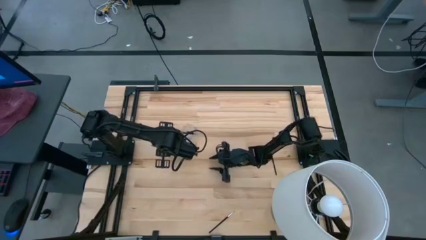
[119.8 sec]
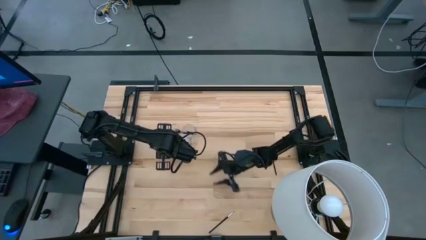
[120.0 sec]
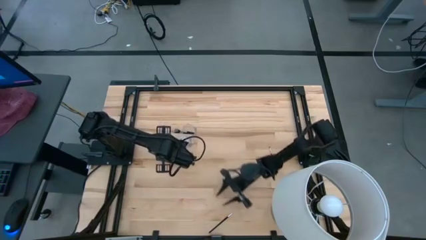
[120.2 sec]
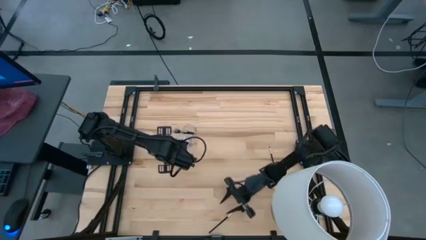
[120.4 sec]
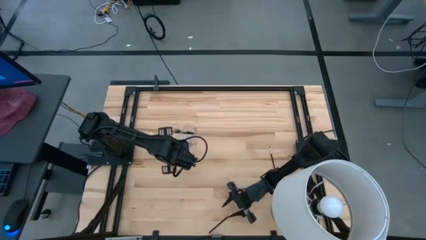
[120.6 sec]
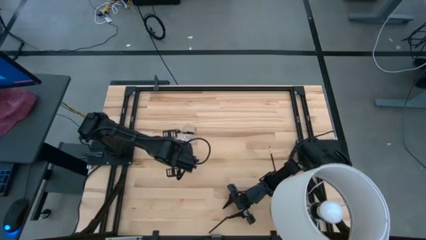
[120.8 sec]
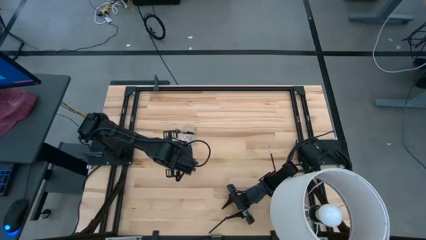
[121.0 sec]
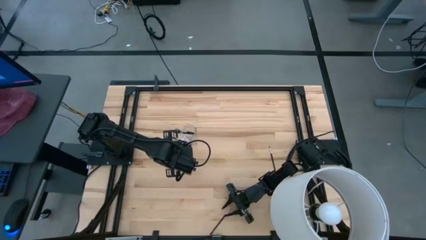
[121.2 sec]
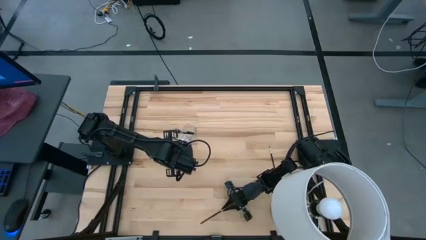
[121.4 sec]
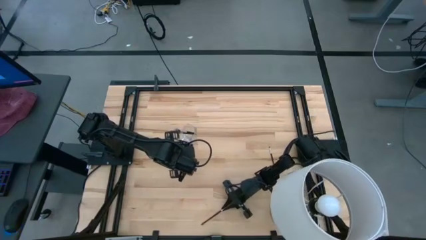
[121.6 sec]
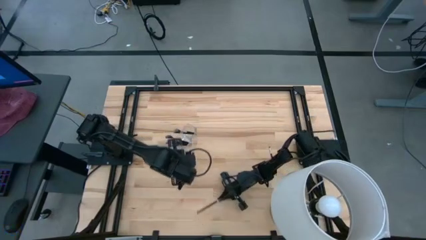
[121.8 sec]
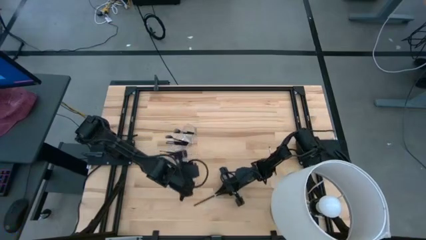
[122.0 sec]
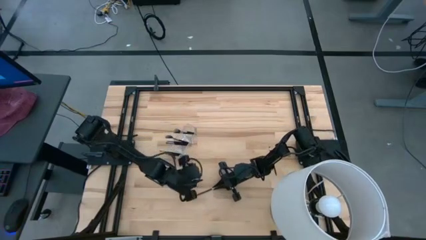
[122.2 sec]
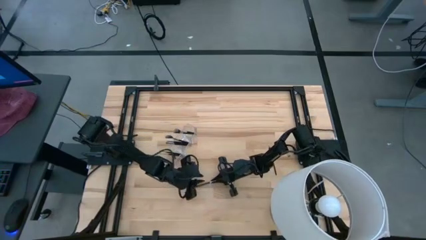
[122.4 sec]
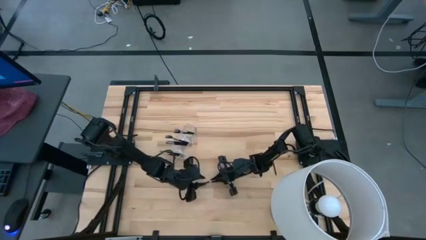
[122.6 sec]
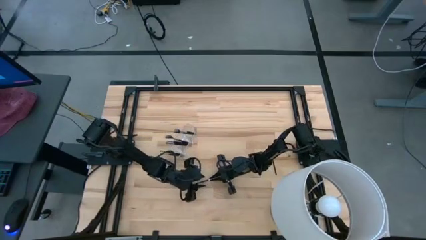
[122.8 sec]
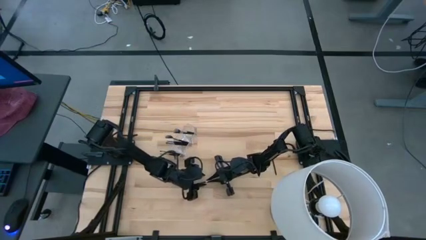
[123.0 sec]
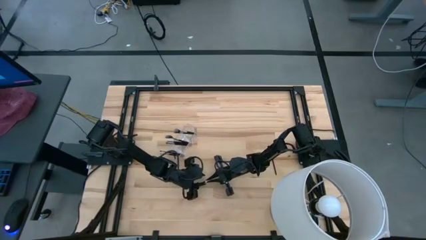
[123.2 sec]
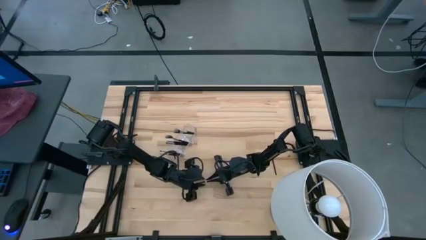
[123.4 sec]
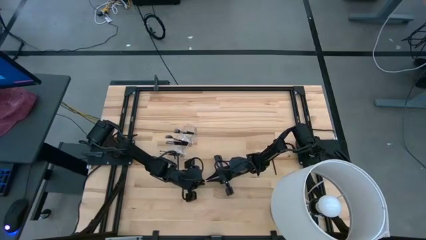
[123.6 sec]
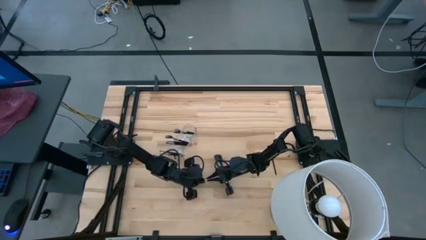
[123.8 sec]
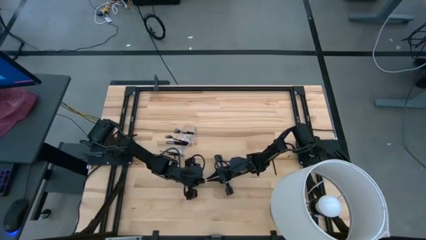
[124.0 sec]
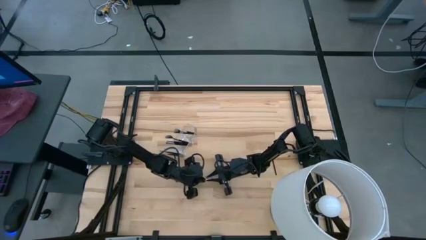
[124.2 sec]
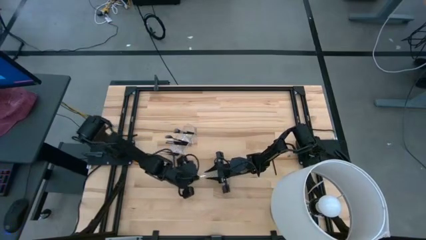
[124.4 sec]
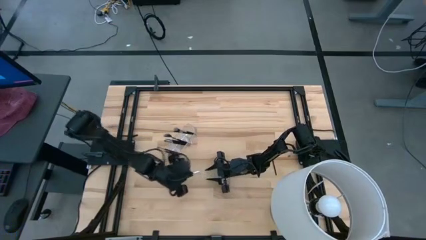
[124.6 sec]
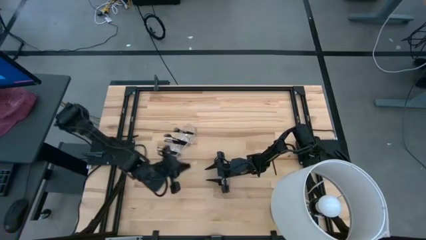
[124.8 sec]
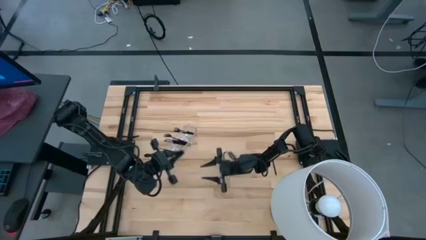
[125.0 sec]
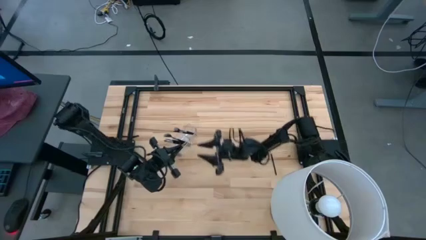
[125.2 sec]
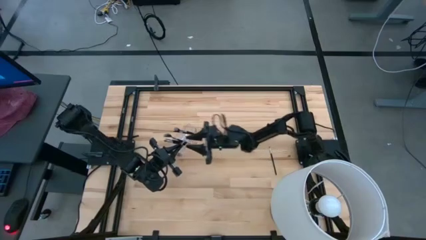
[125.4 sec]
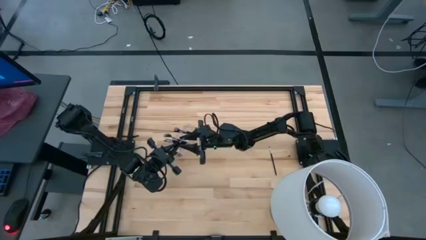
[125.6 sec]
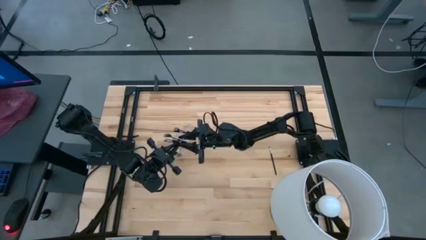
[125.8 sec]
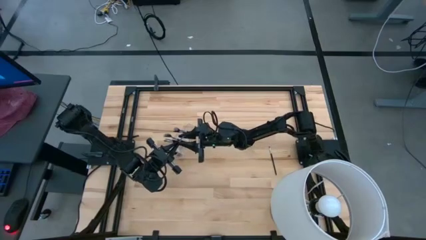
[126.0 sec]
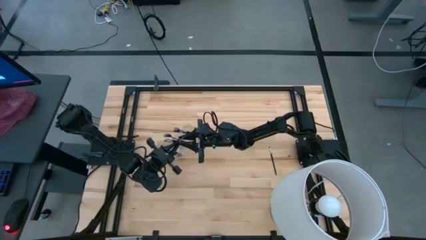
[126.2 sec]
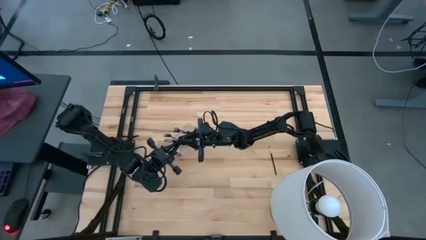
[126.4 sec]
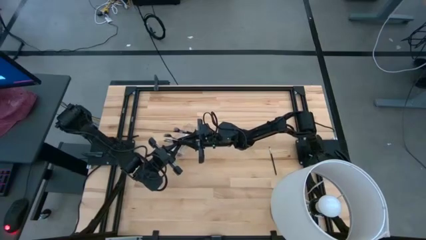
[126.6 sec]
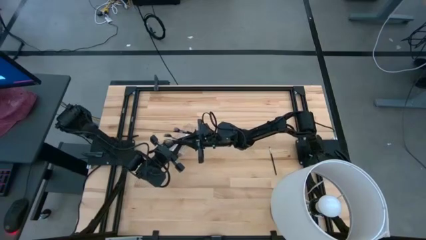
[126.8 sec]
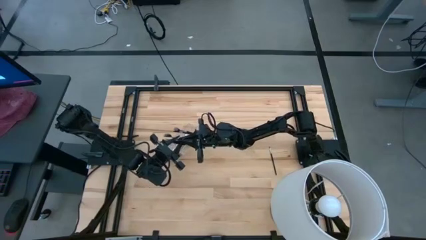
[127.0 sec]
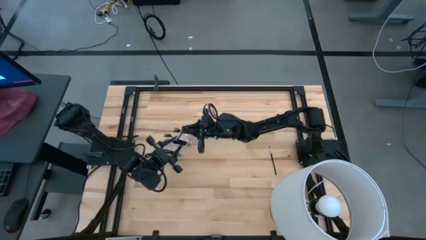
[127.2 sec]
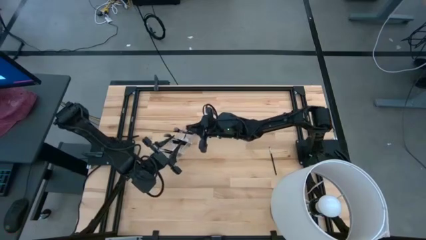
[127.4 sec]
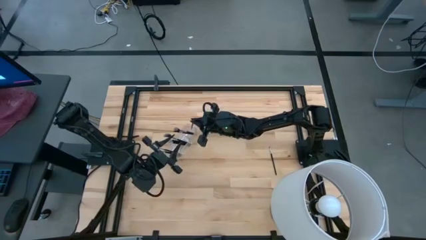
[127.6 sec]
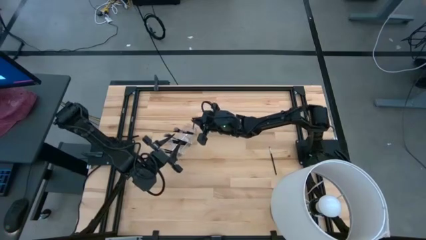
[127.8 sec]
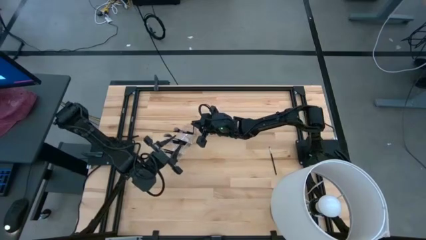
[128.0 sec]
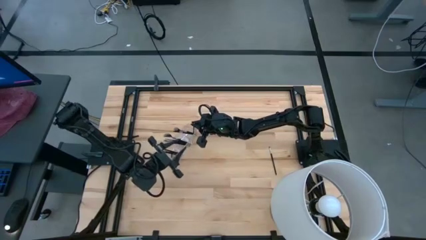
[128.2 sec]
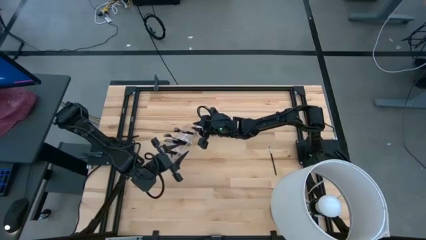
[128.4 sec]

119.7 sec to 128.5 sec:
Task: Put items in baskets/containers
Put the eyeshadow brush into the middle section of the transparent organizer

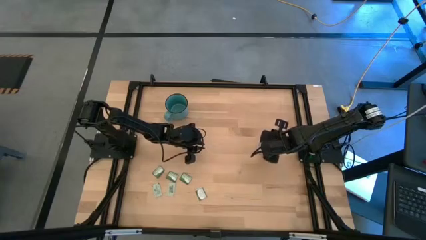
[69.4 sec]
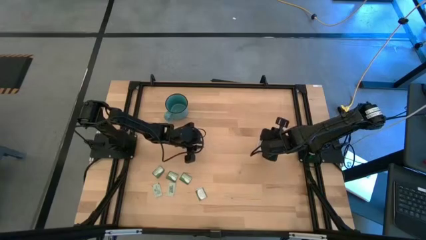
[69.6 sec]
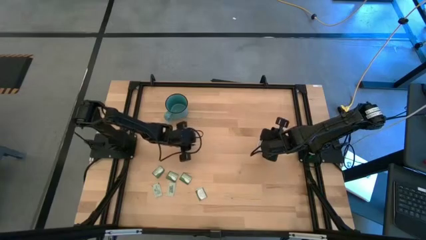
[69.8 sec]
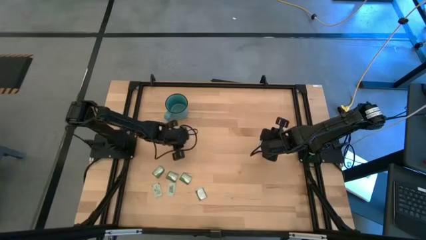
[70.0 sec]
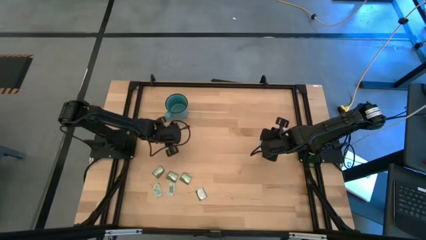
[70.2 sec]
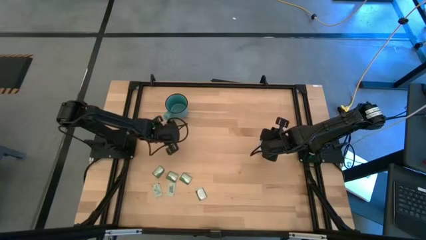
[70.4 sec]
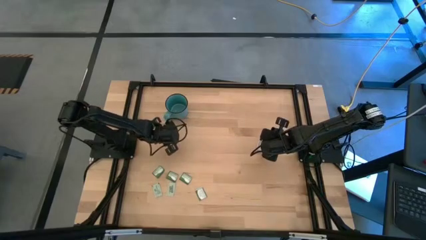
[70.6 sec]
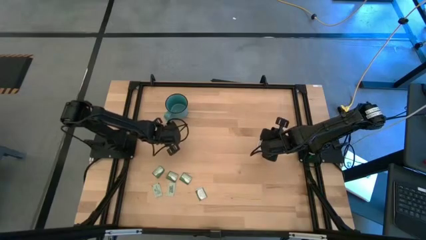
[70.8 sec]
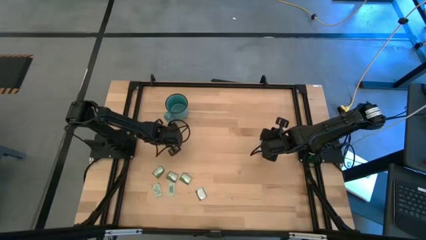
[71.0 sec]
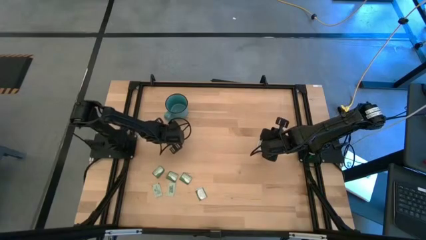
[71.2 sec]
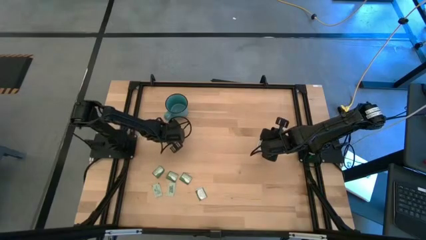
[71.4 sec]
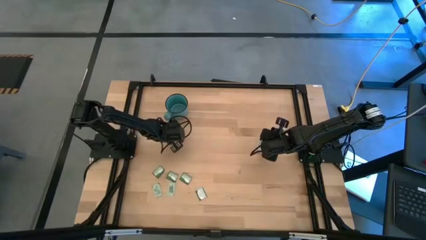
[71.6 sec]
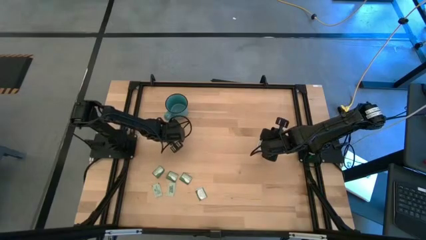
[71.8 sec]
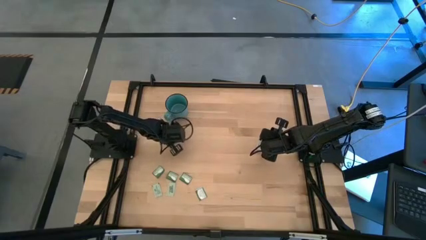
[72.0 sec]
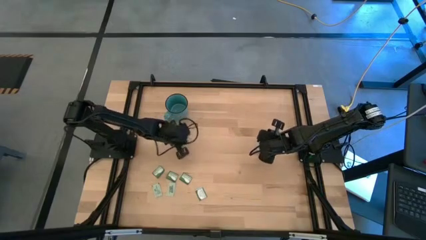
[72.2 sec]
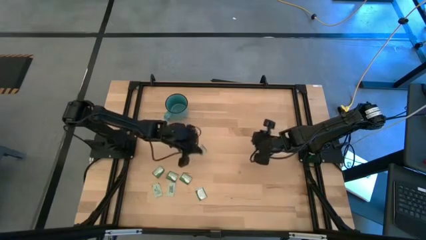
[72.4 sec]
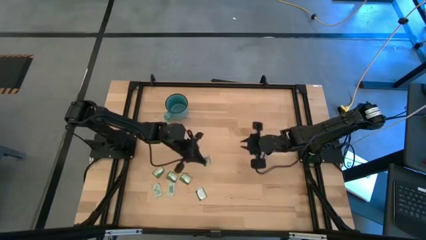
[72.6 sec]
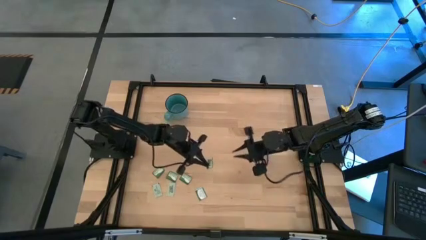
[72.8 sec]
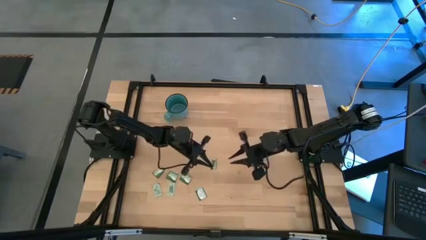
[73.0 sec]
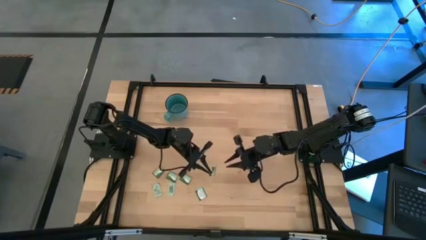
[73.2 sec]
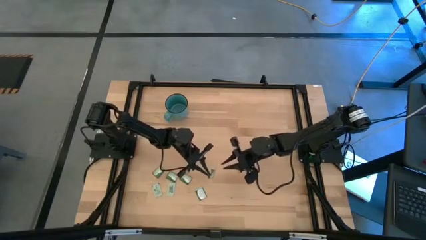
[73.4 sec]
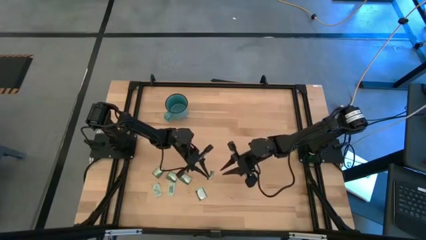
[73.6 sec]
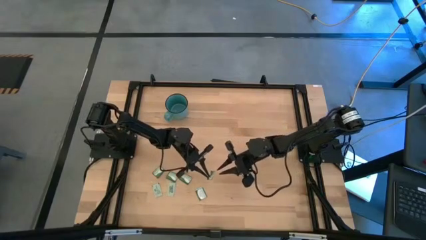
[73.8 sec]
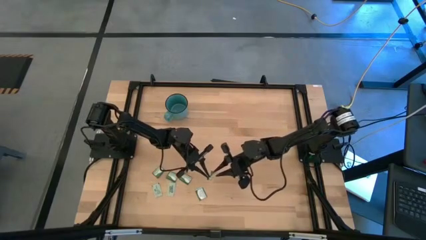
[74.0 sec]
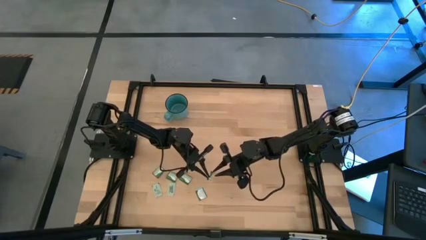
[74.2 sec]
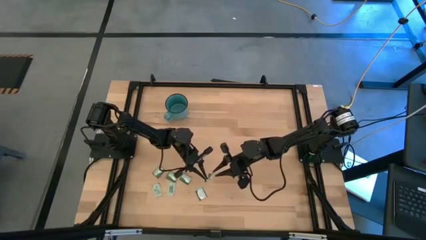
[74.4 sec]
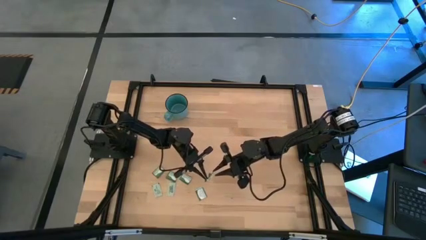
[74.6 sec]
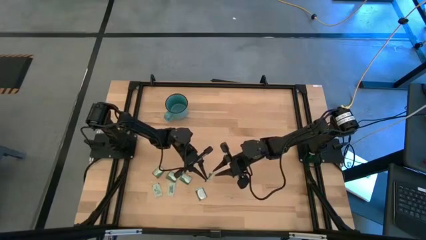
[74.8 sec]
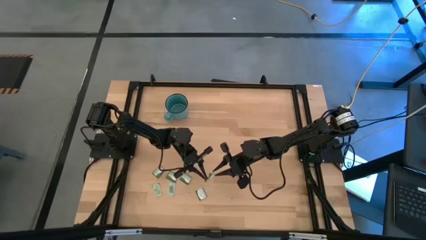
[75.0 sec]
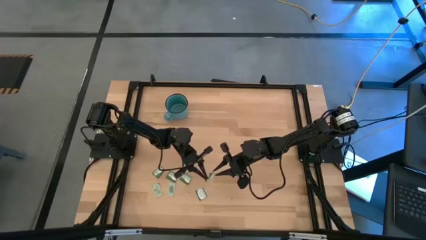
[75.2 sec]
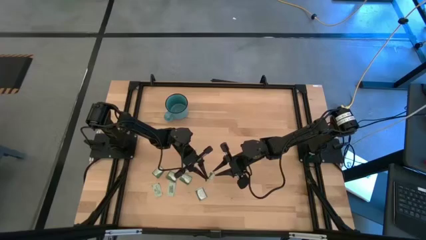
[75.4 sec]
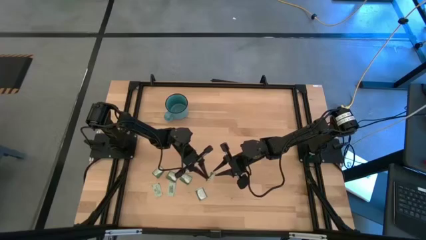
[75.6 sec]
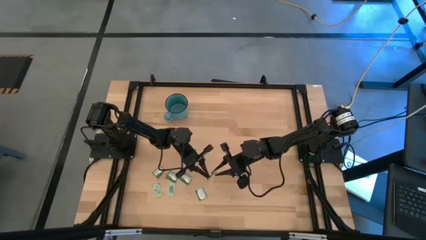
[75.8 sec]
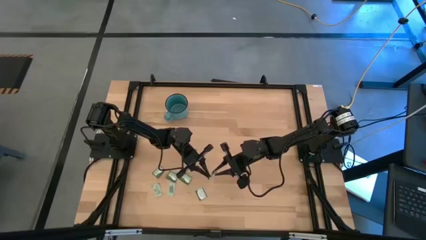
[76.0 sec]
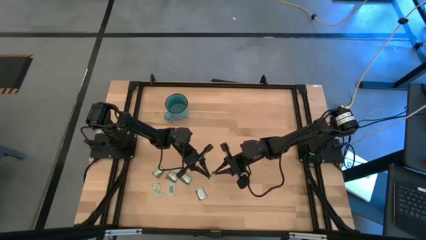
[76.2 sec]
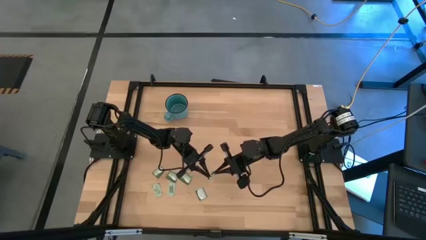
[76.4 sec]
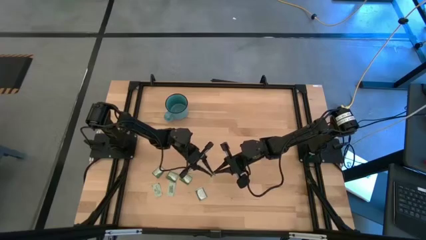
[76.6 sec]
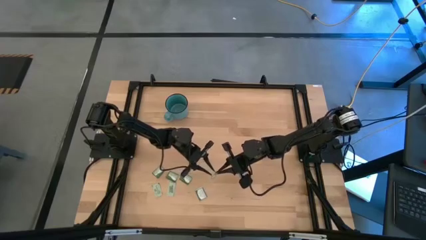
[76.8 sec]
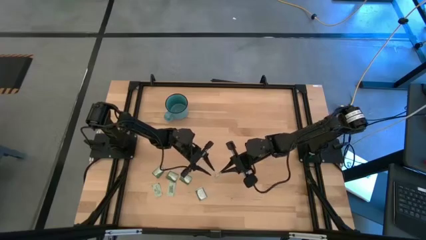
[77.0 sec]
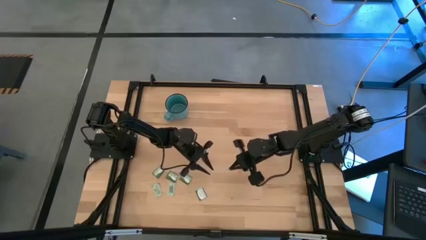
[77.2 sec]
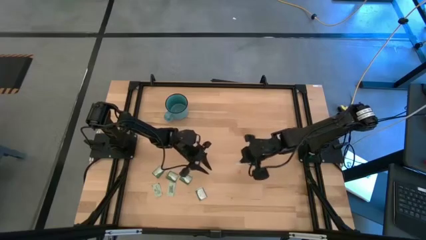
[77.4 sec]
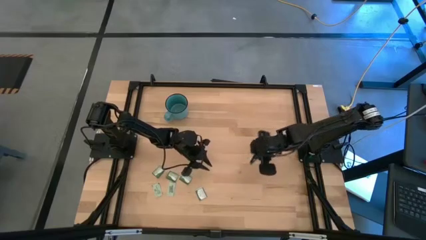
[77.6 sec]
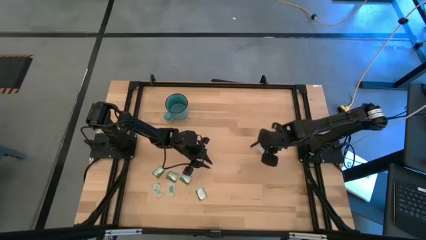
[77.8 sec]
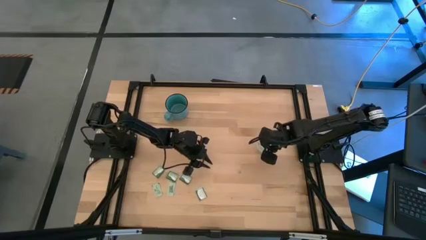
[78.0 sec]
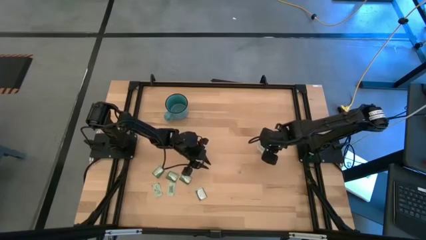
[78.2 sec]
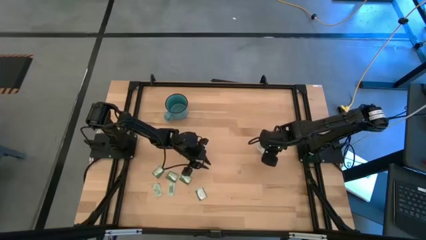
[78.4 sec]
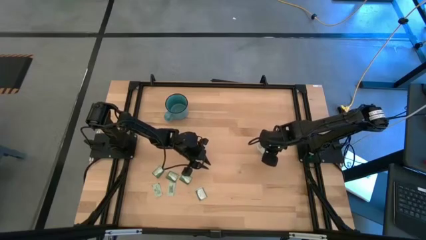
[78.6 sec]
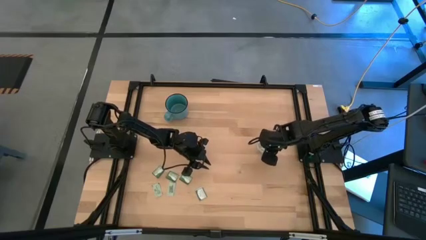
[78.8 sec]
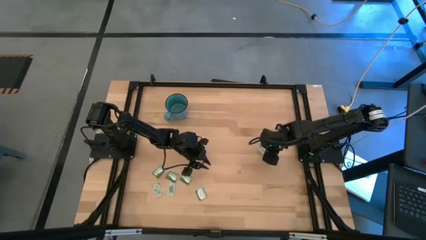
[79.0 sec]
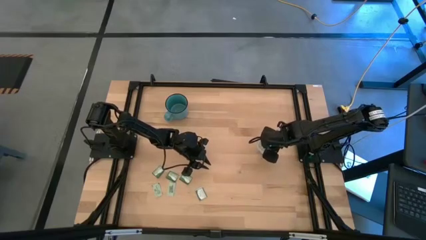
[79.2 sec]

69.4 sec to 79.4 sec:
Task: Pick and place Stevia / Truvia into bins
Put the truvia packet into the transparent bin
